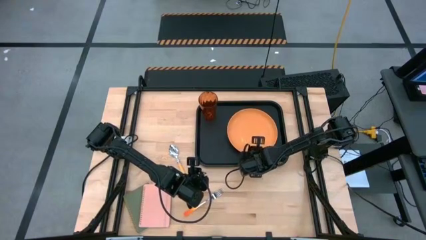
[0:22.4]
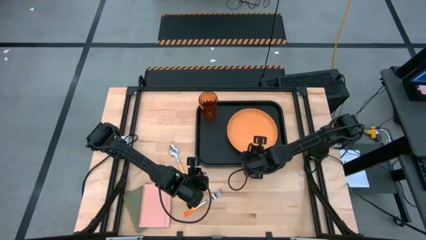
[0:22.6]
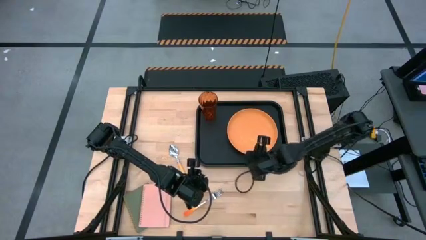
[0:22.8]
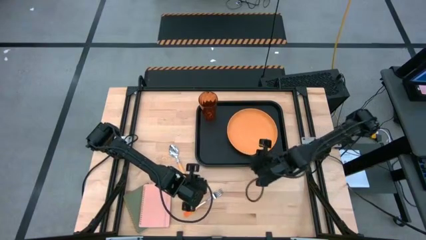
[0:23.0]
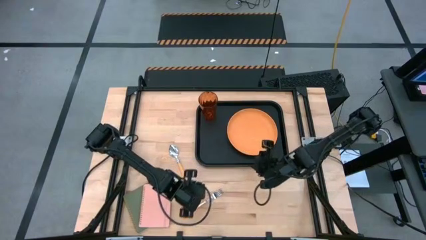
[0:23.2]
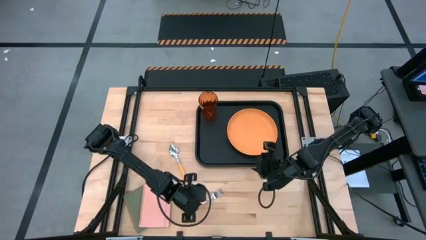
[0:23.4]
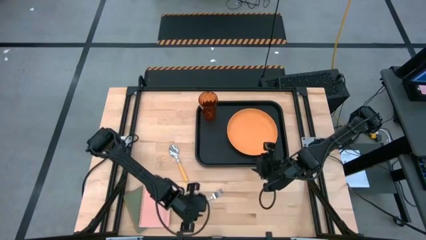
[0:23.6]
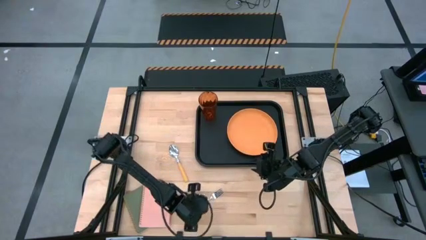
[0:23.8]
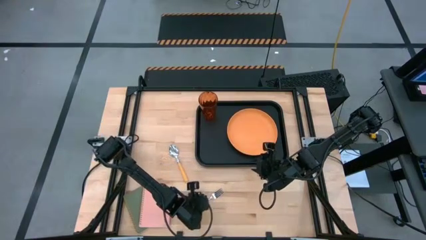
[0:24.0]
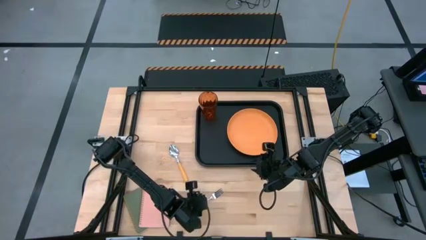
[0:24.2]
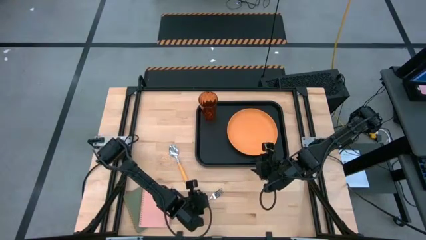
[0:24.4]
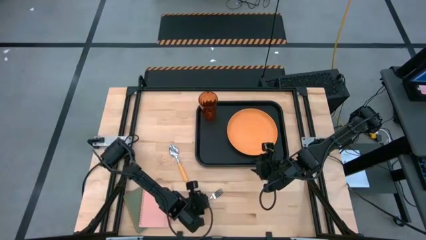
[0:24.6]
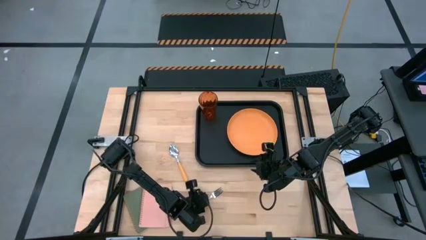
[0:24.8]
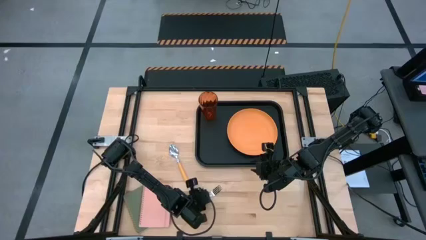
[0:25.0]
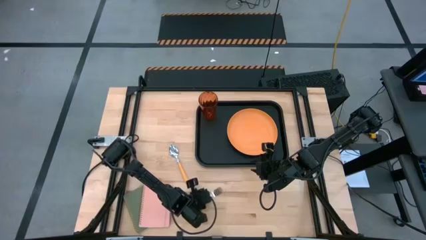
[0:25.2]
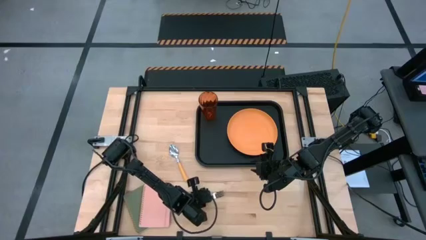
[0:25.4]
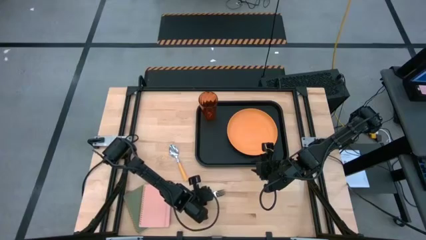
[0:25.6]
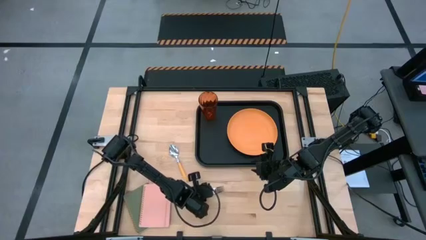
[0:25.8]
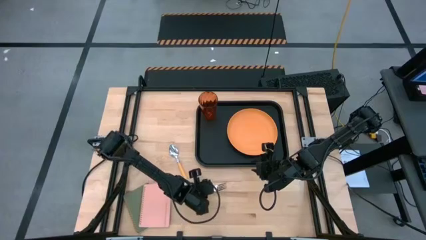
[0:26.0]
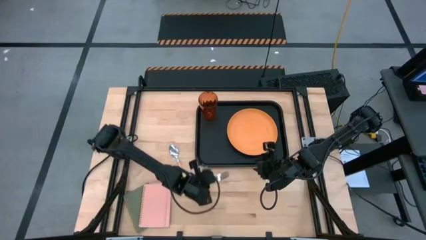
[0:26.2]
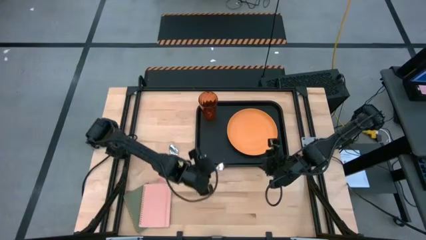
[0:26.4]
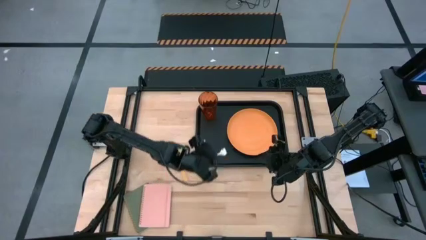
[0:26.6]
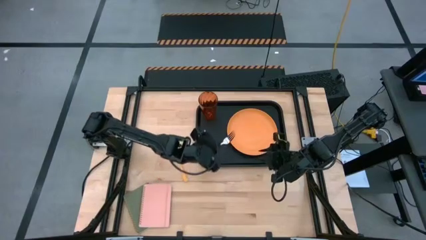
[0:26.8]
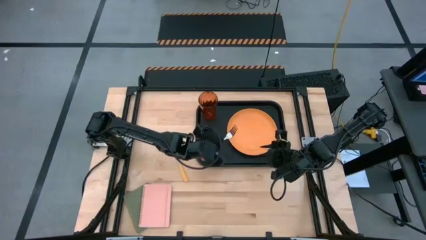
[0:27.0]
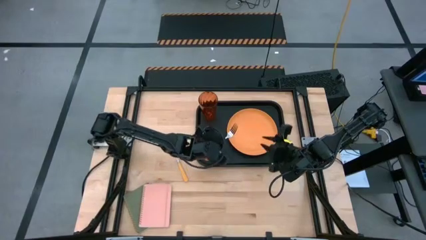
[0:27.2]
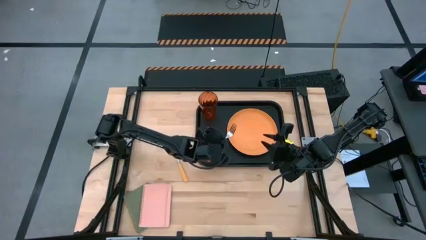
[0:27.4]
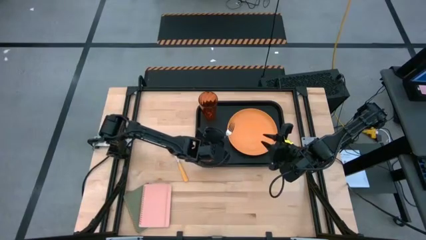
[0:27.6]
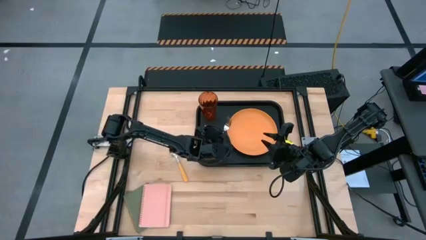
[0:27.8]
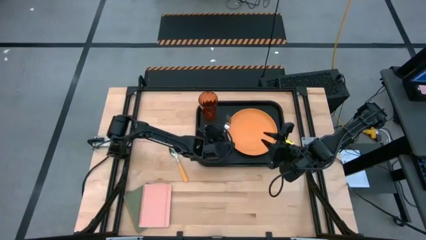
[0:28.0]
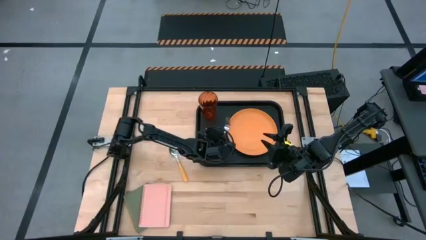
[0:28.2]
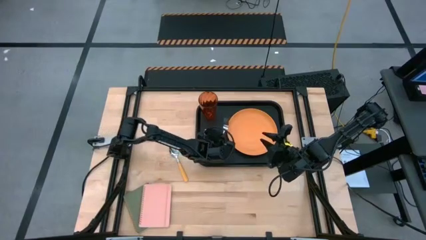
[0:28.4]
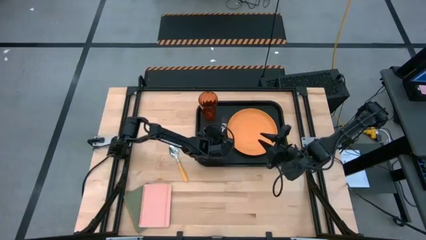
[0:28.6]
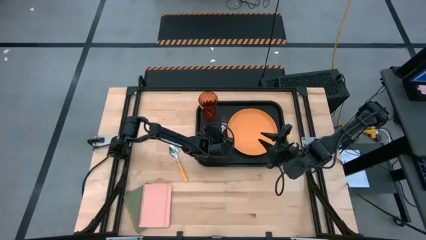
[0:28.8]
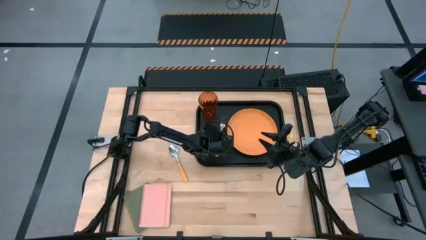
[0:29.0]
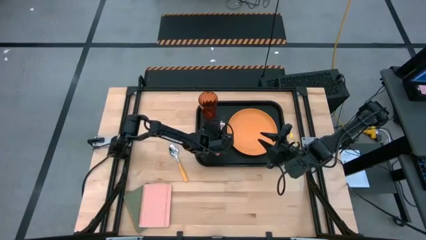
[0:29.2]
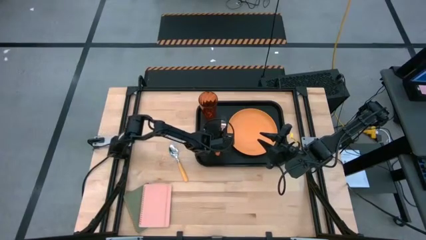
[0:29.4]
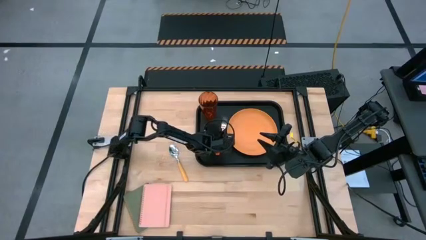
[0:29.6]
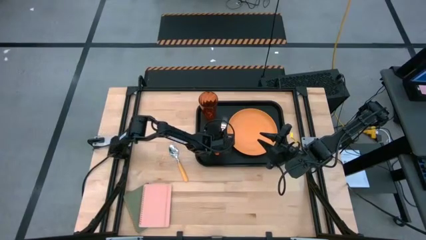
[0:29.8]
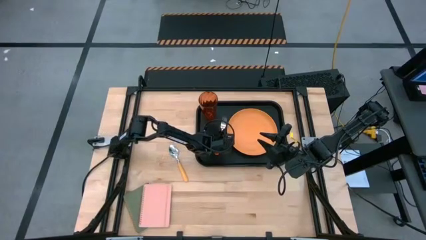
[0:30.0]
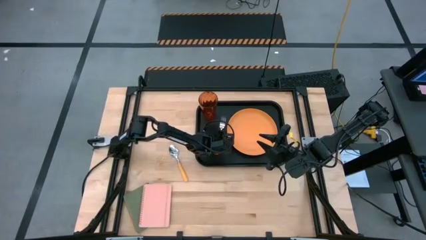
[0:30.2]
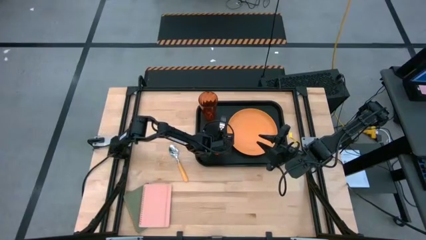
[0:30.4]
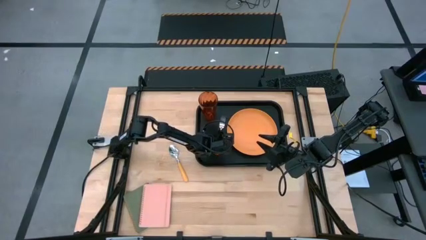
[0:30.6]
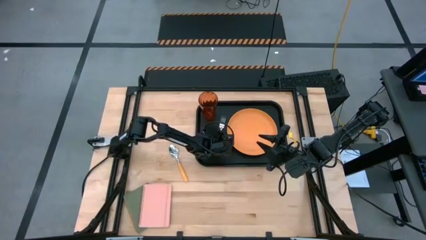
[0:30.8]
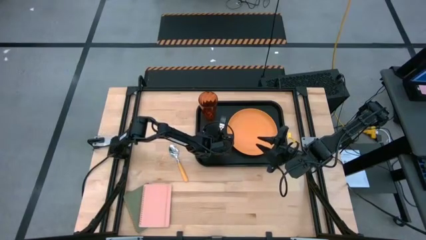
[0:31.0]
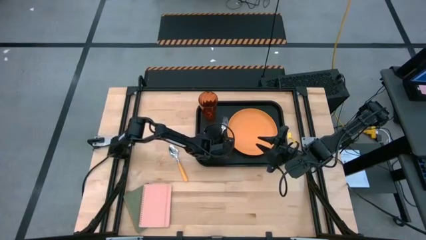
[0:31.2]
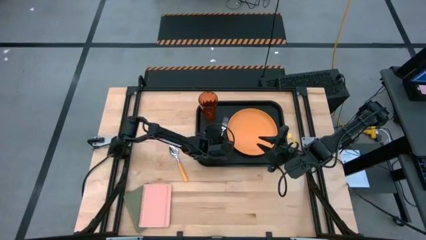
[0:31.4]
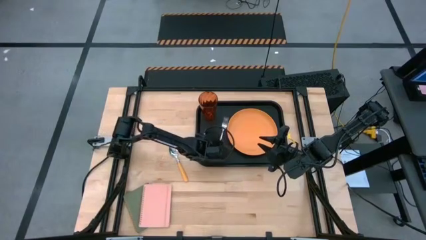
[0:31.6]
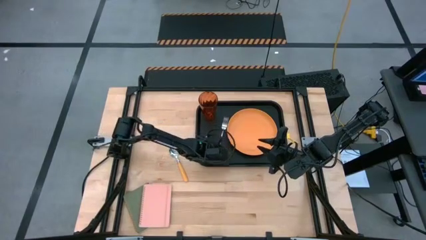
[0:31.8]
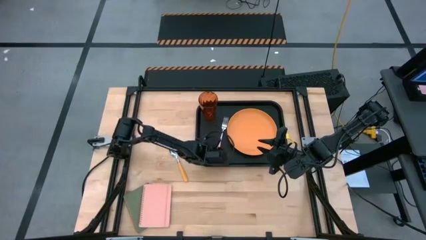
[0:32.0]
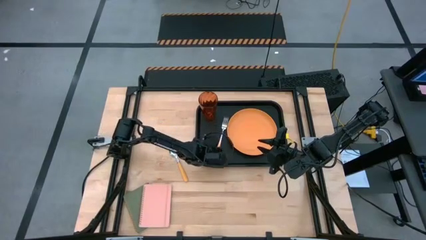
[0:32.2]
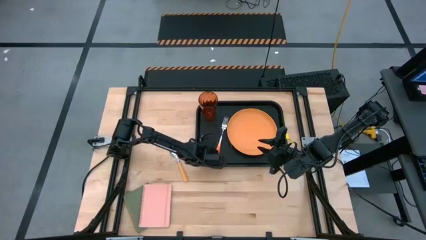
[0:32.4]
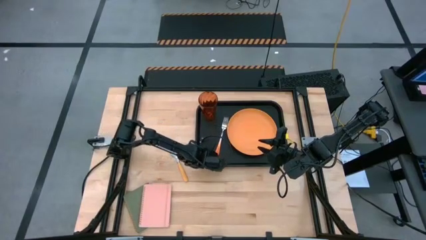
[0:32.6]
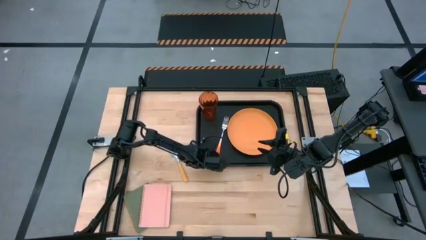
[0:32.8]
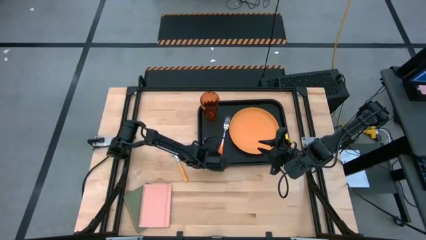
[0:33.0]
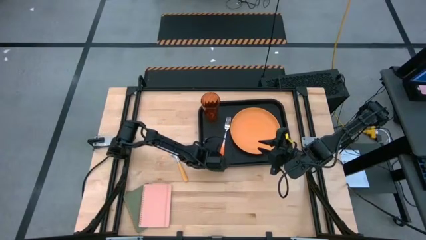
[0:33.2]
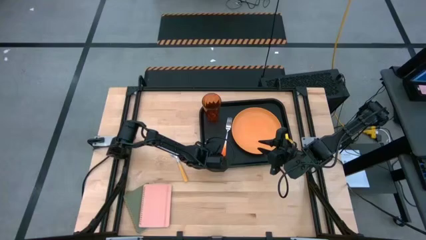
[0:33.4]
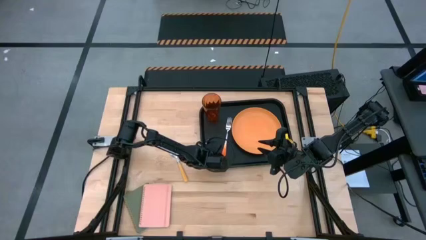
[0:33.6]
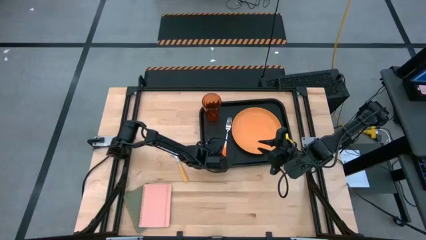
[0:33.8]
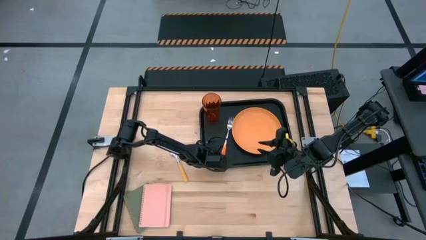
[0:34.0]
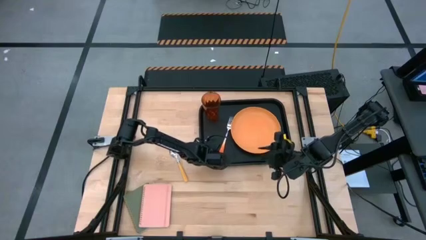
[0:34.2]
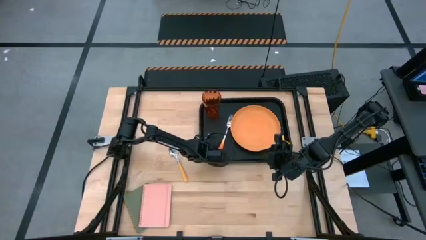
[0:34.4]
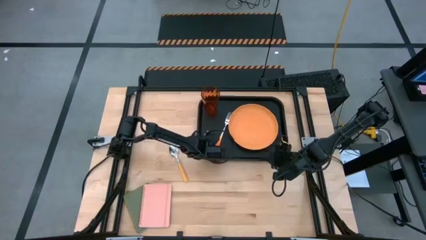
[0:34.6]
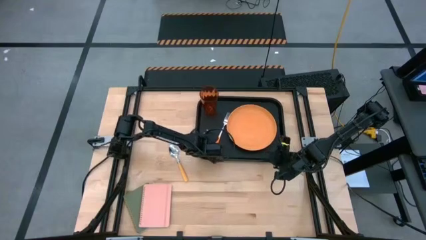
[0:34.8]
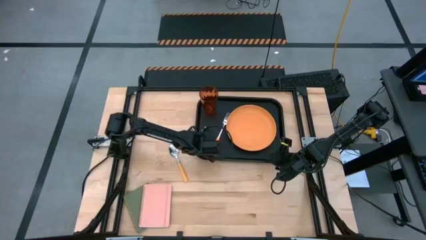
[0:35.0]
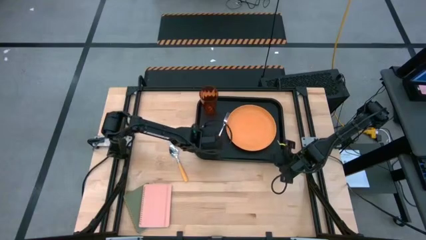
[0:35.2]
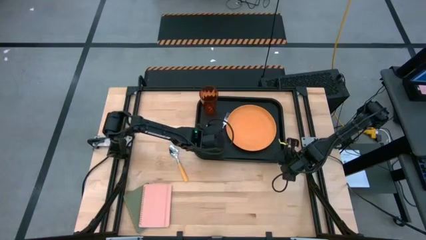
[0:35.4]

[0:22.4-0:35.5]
Task: Pick and place plate/cup/fork/spoon on tray
Put the orange fork on the black serving tray to the left of the orange plate
